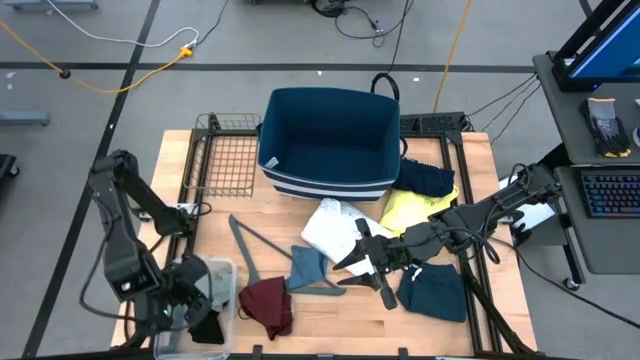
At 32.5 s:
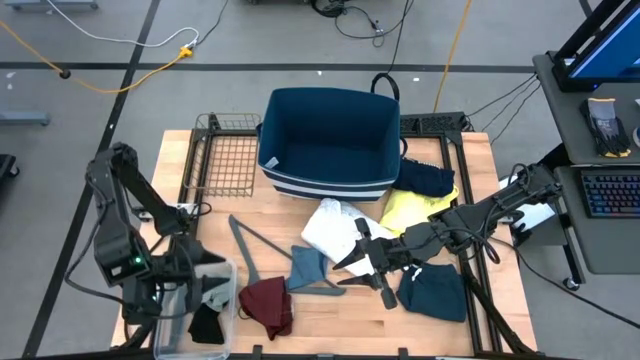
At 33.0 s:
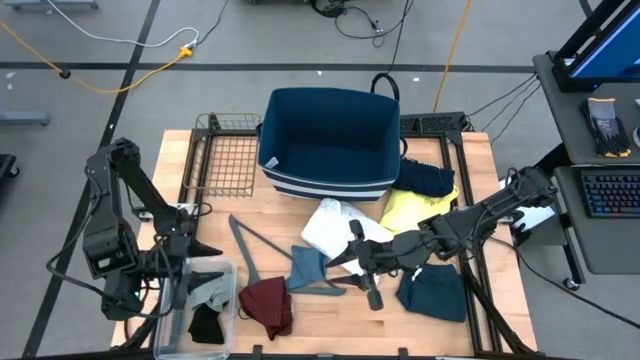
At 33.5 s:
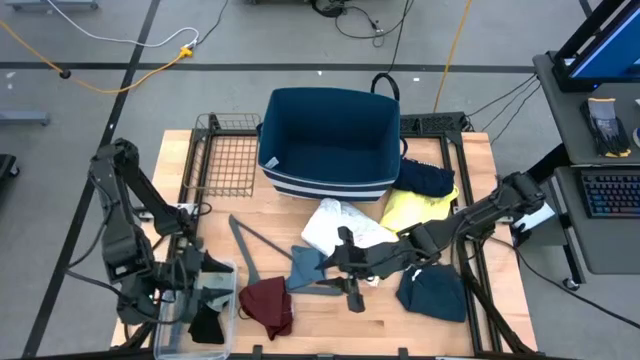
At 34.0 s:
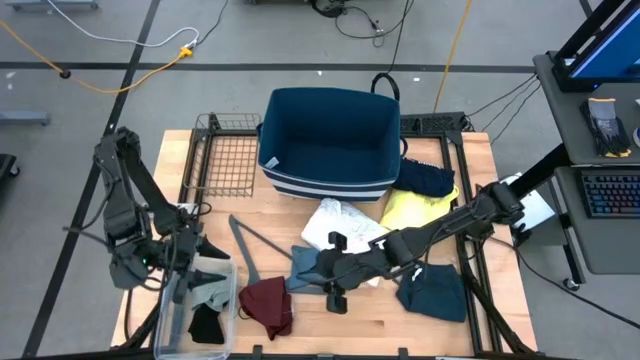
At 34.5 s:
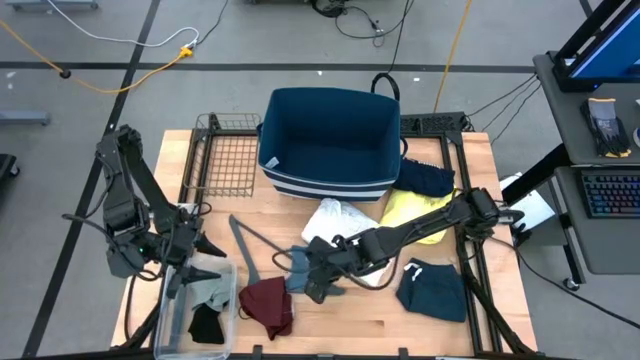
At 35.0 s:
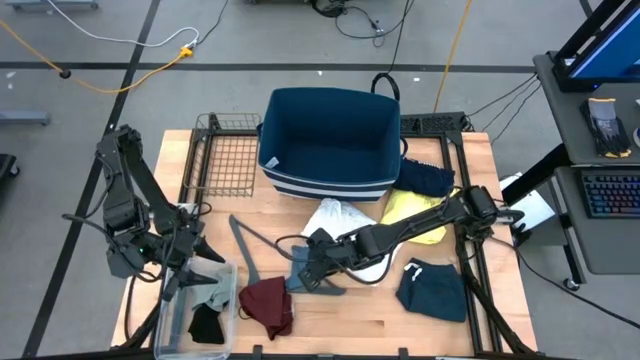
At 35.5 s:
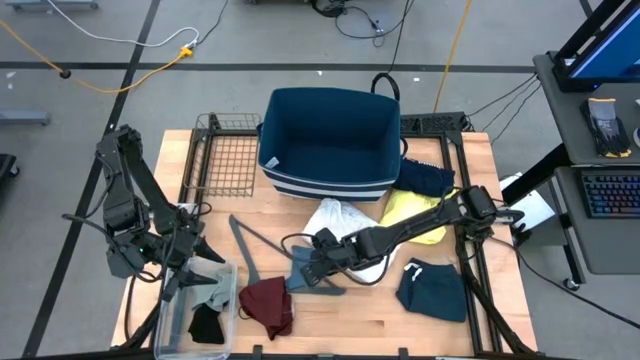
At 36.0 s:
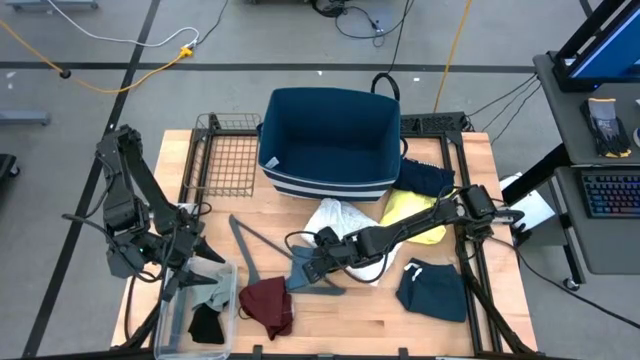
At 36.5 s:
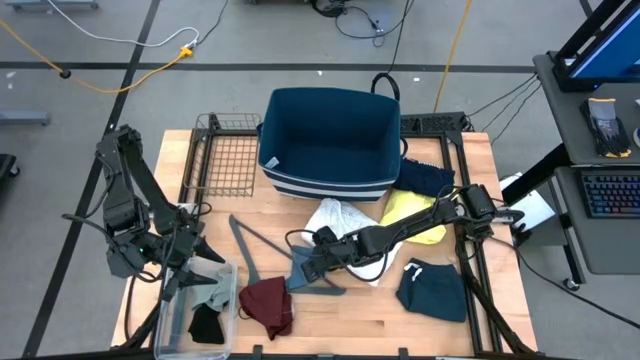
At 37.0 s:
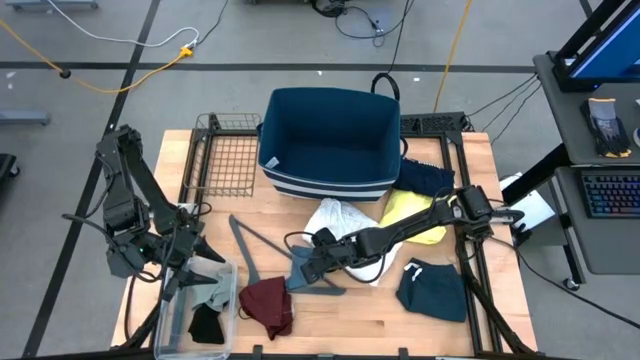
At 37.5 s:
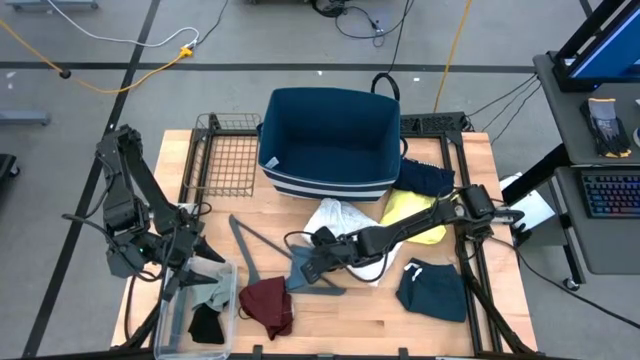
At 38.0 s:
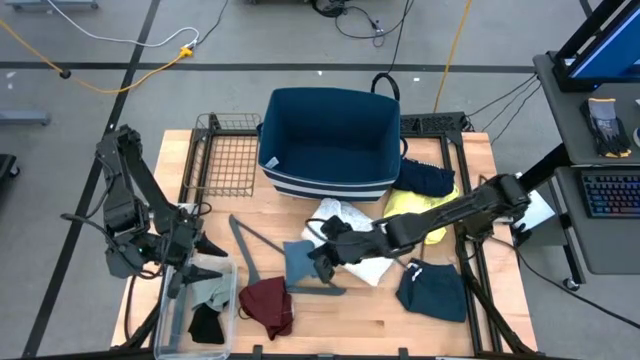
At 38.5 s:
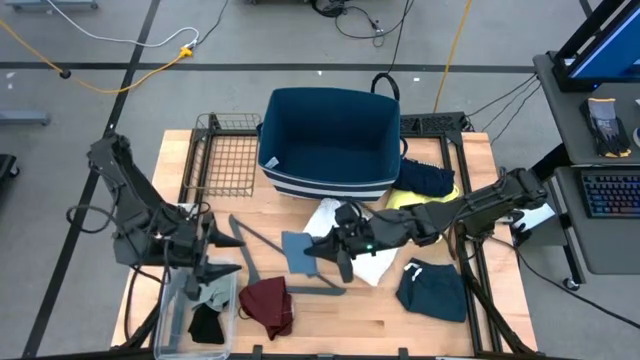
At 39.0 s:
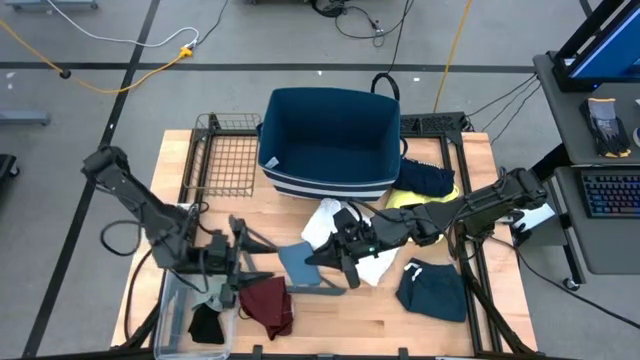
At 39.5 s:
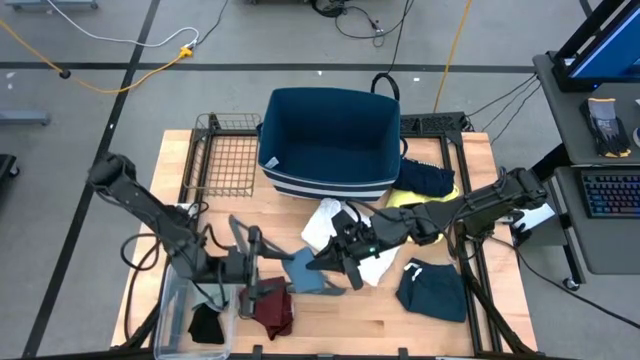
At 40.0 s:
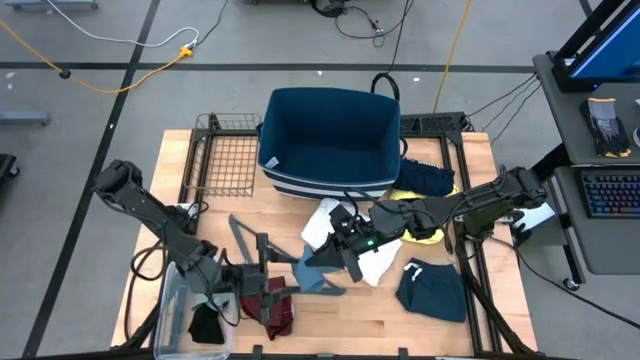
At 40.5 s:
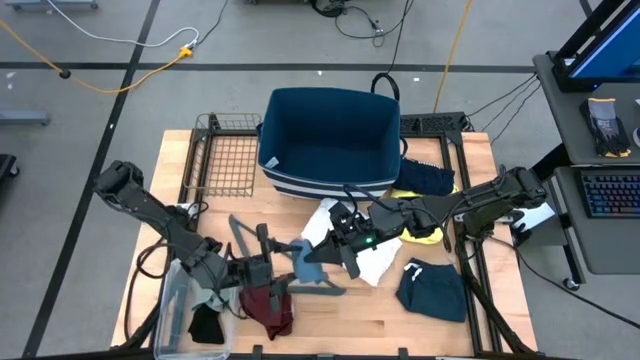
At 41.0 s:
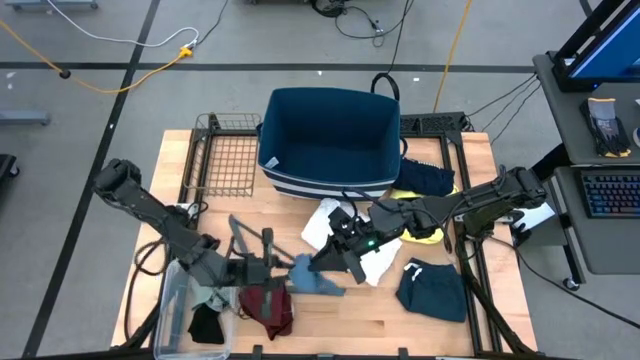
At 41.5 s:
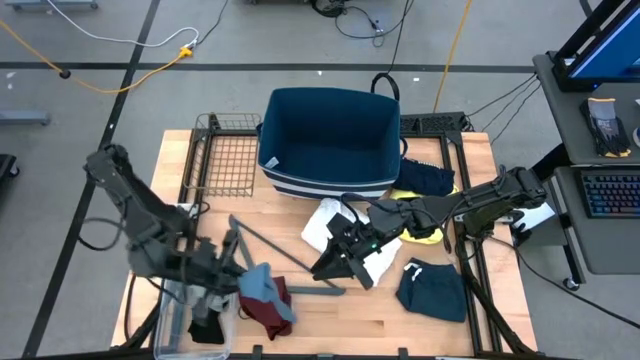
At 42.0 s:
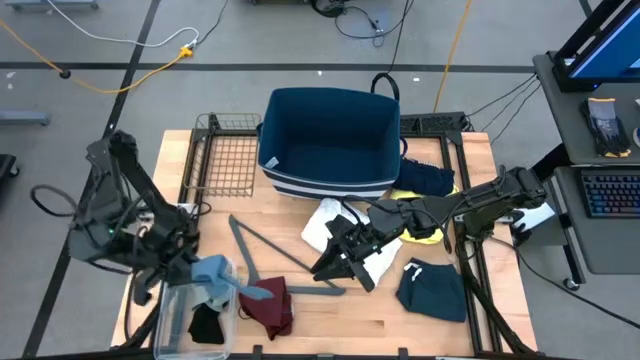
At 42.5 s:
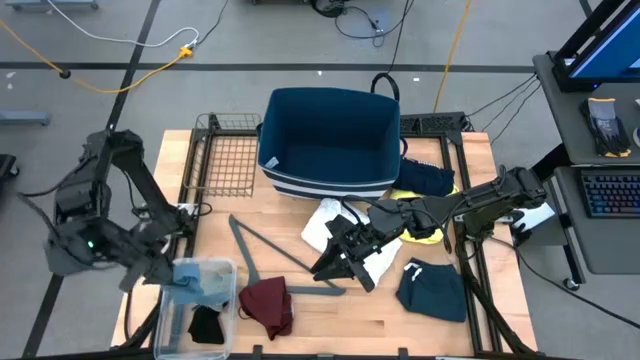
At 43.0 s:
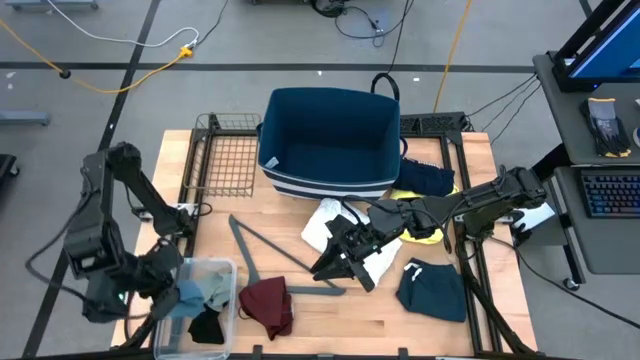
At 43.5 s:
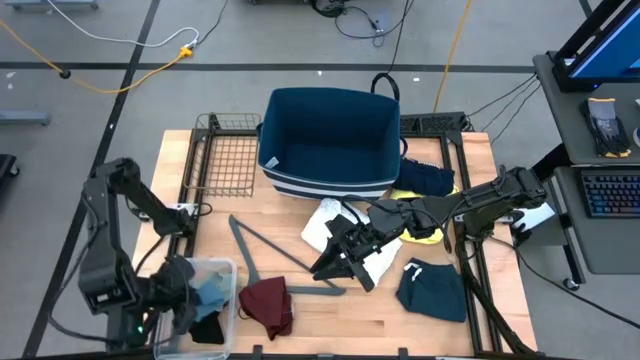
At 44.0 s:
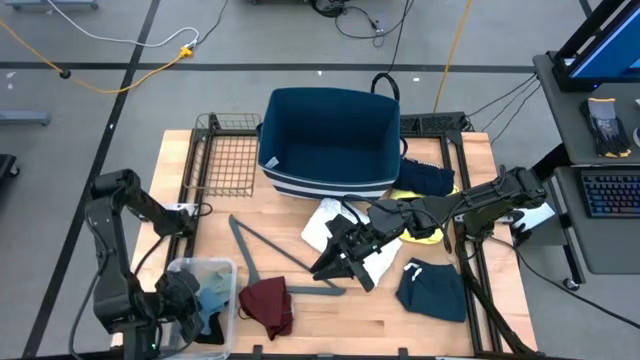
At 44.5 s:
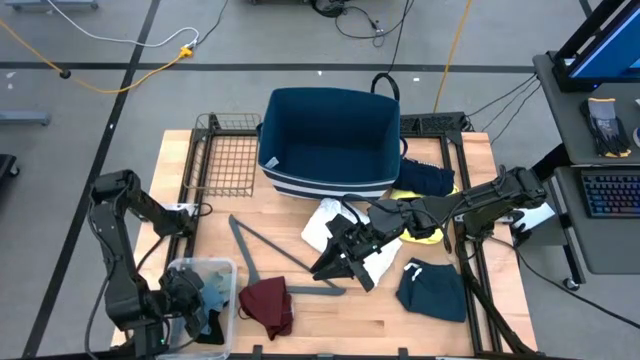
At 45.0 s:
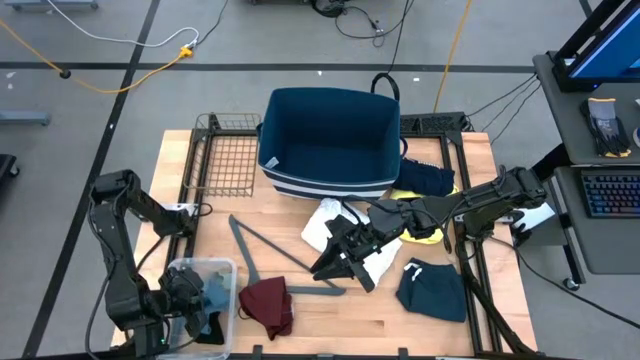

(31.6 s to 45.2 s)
Task: Pick & Place Cloths
Put the blue sock into the transparent bin

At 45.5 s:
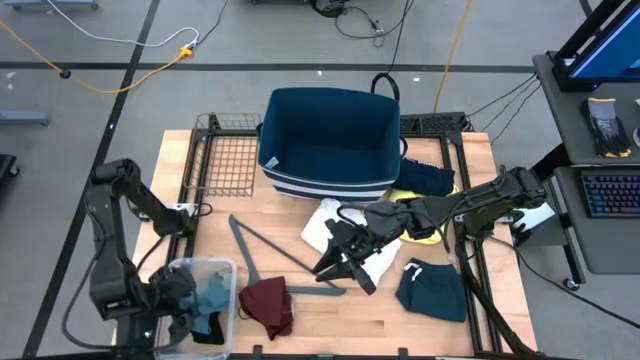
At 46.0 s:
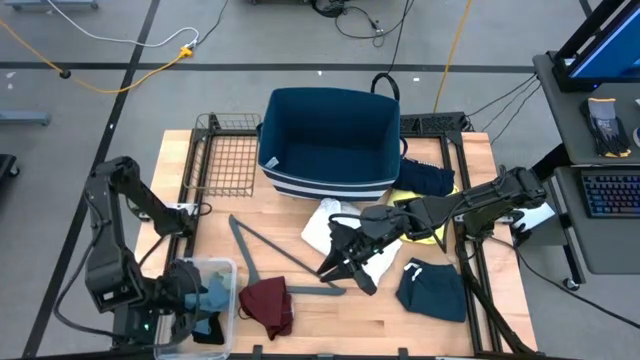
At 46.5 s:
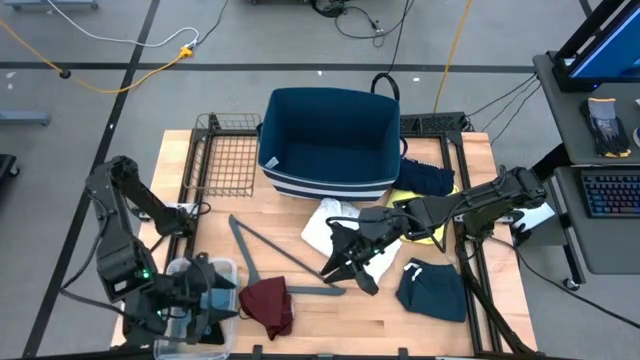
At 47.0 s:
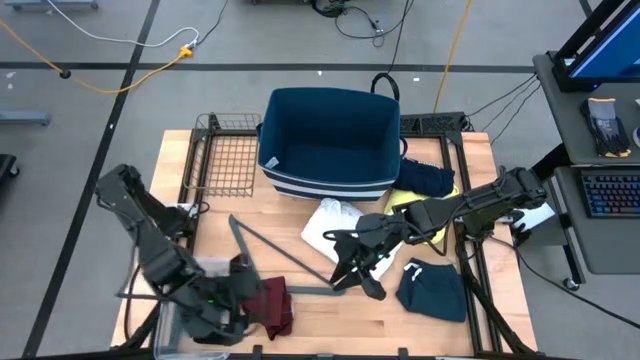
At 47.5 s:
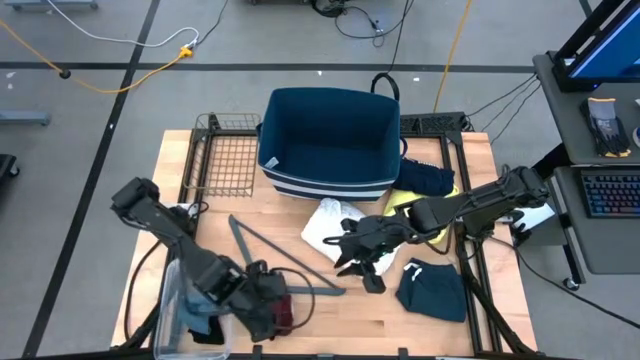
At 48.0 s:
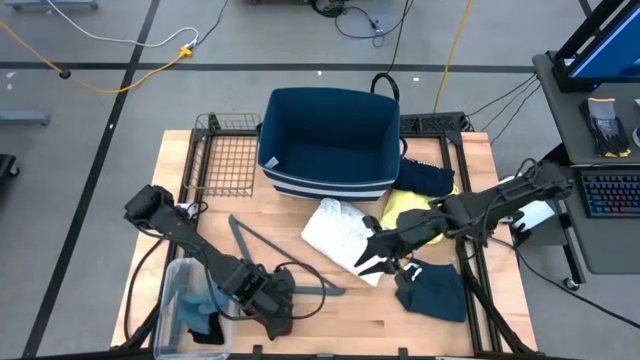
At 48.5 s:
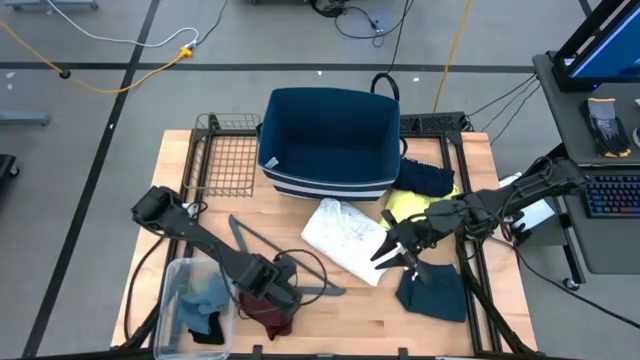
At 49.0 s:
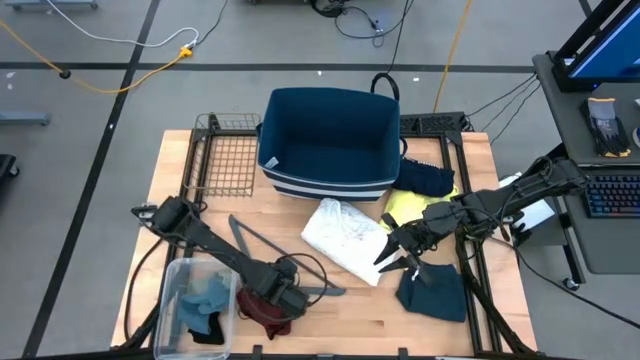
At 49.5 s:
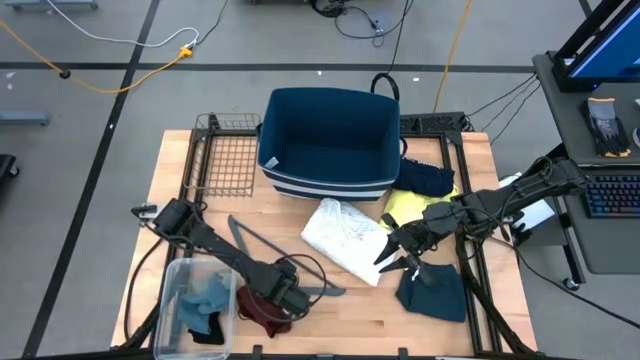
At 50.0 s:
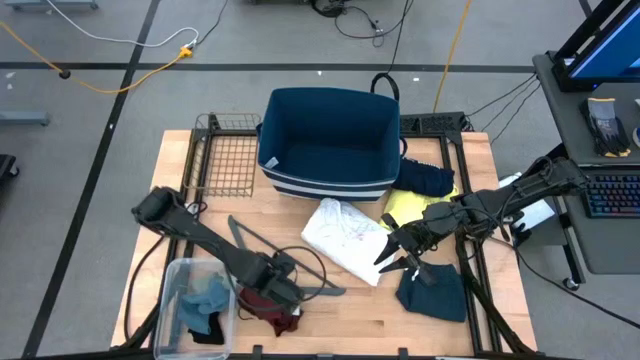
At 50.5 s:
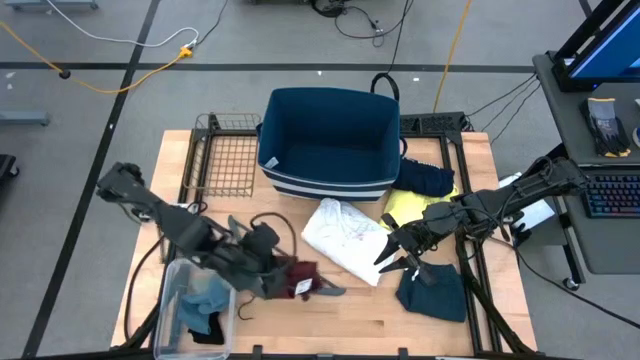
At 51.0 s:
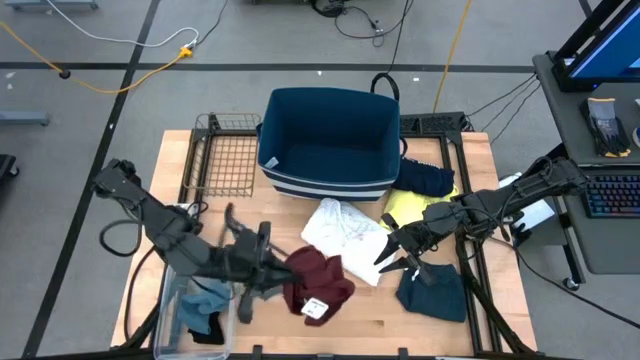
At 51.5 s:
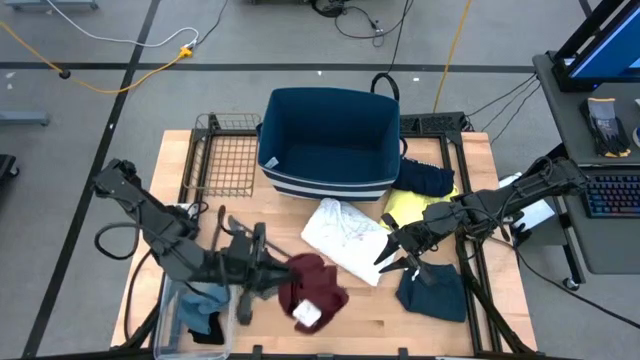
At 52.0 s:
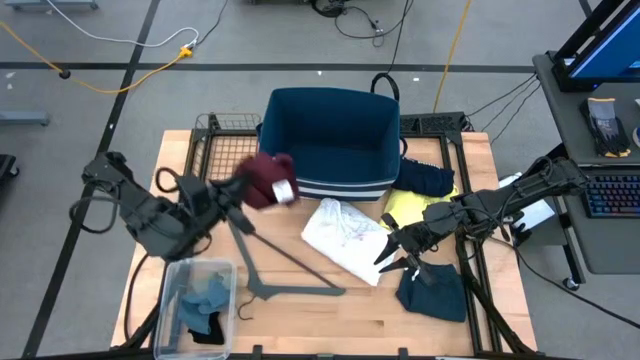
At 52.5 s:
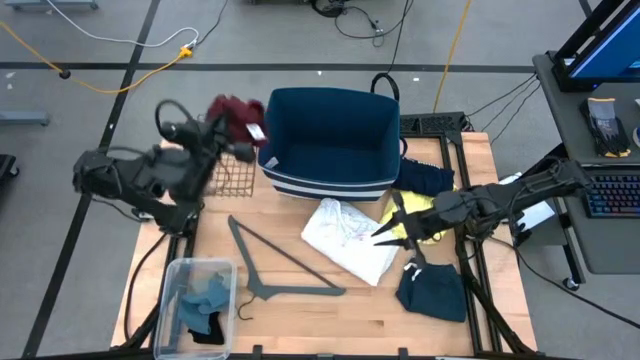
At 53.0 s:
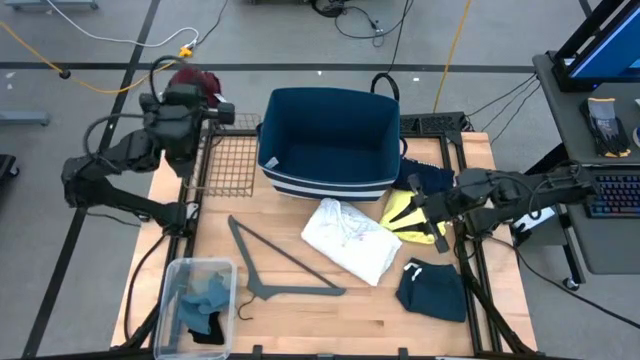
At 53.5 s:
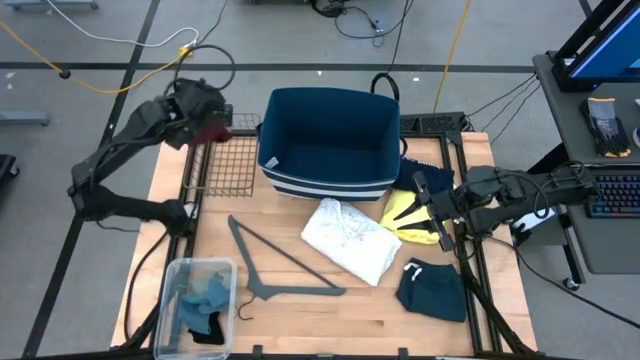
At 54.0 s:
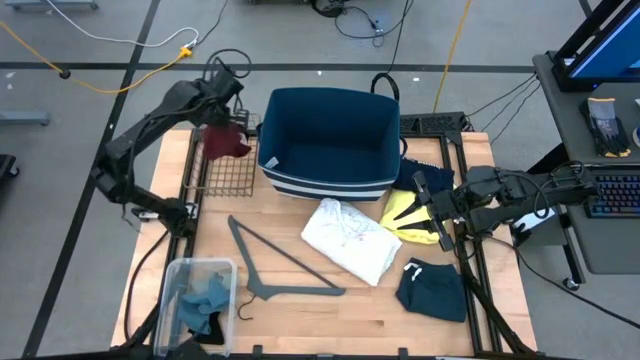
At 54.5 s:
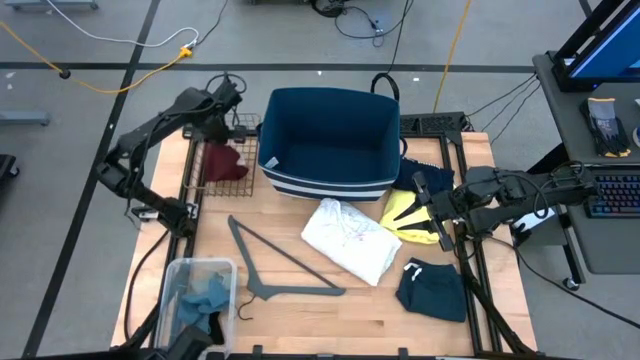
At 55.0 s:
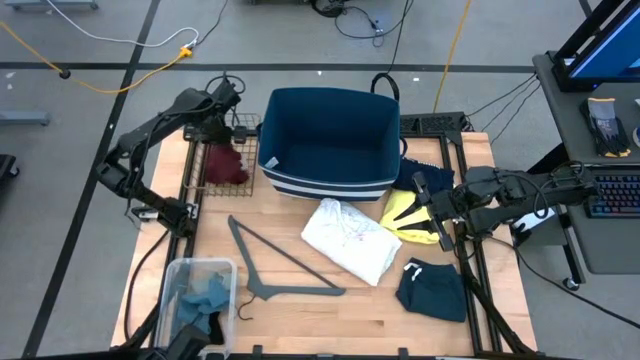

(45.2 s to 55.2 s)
Put the dark red boxer into the brown wire basket
